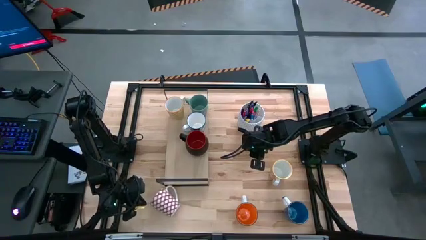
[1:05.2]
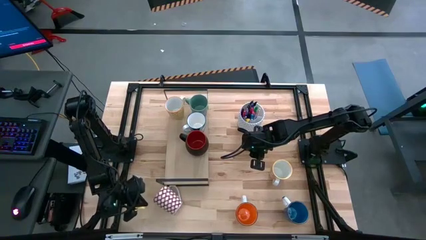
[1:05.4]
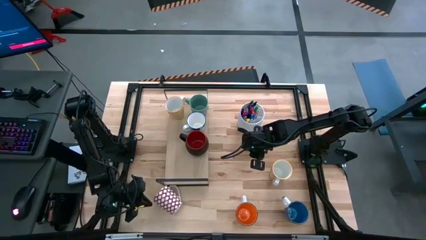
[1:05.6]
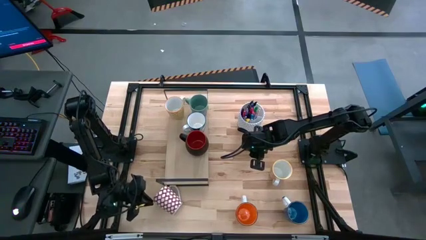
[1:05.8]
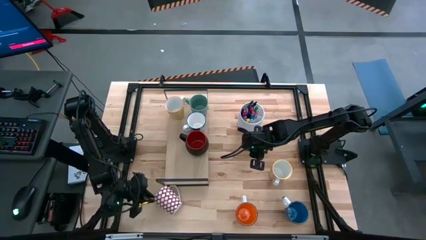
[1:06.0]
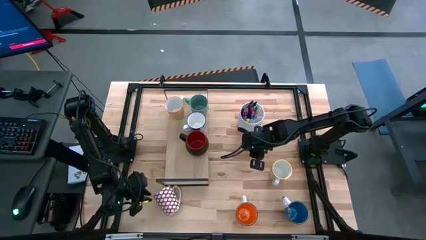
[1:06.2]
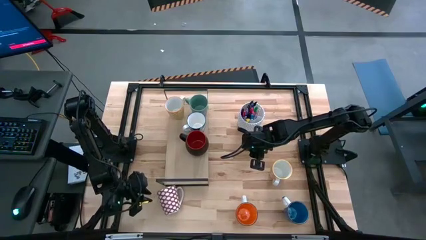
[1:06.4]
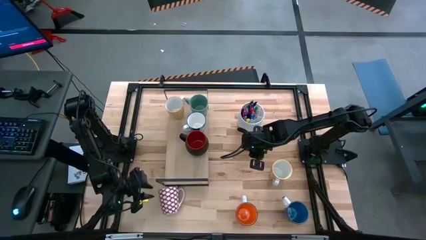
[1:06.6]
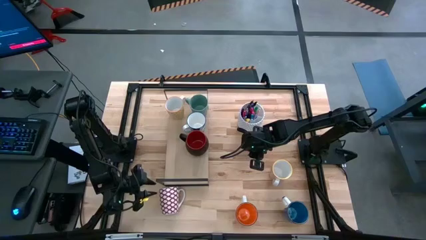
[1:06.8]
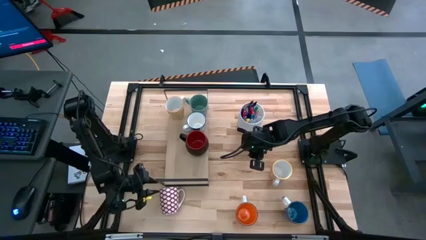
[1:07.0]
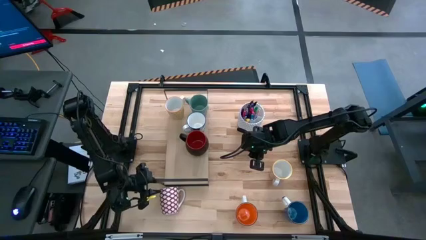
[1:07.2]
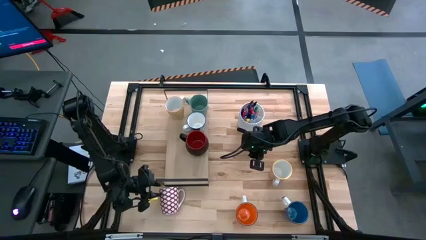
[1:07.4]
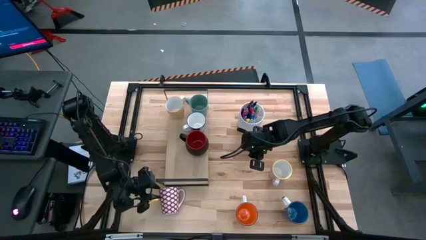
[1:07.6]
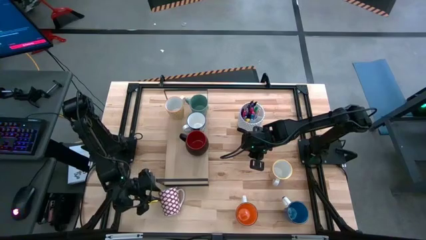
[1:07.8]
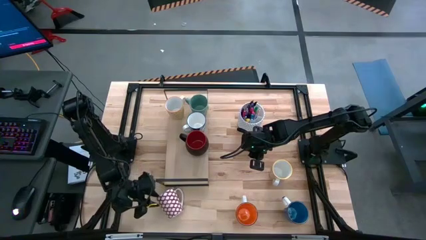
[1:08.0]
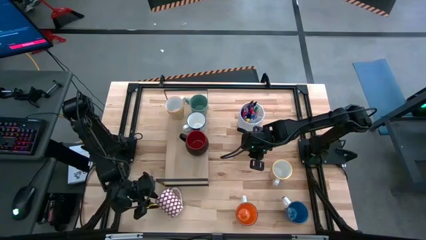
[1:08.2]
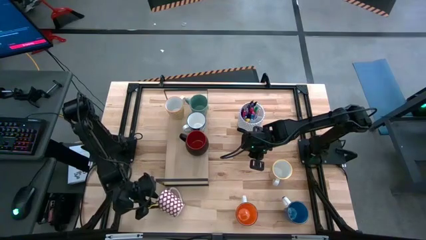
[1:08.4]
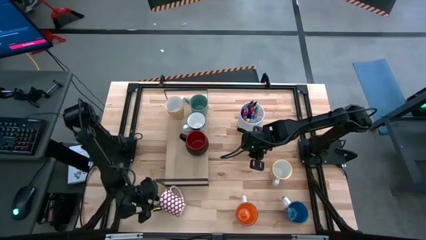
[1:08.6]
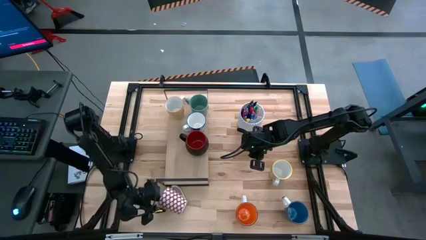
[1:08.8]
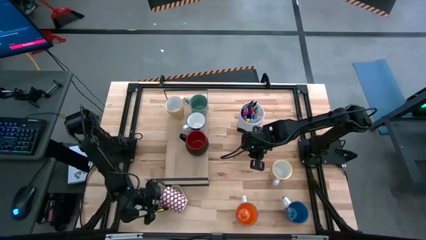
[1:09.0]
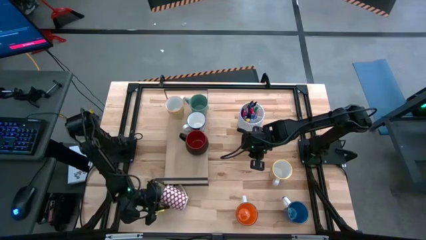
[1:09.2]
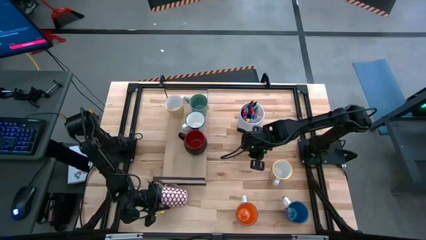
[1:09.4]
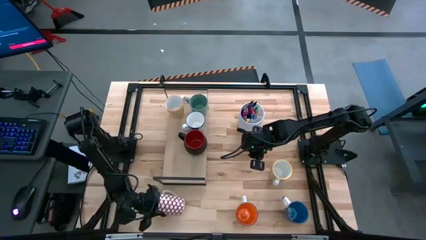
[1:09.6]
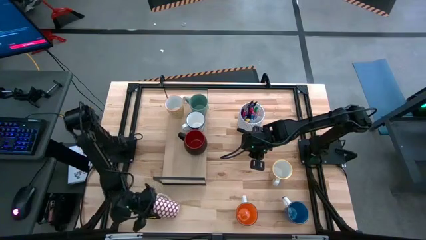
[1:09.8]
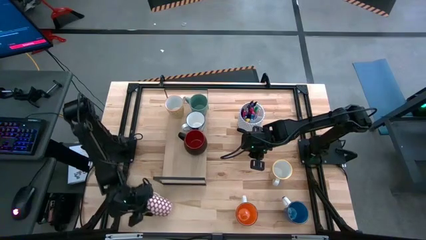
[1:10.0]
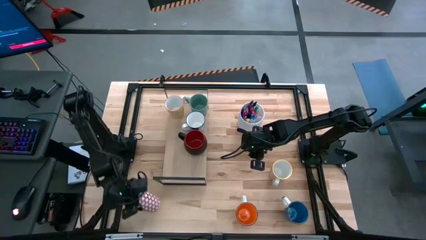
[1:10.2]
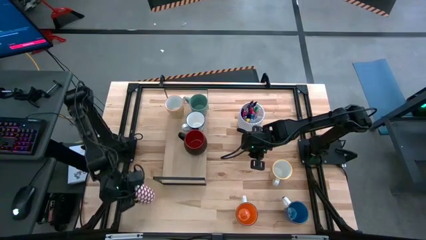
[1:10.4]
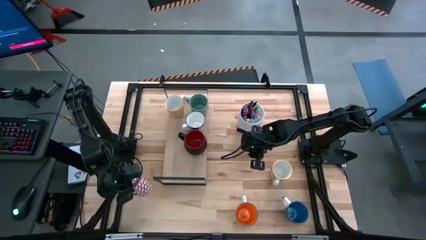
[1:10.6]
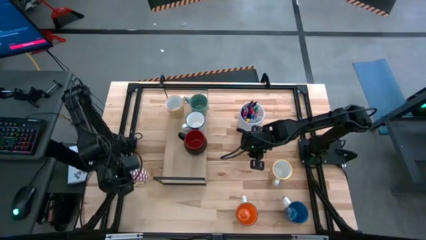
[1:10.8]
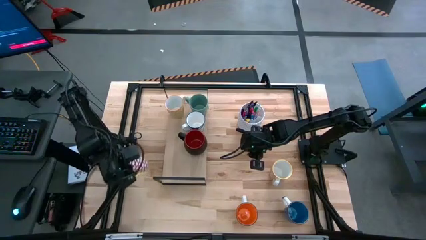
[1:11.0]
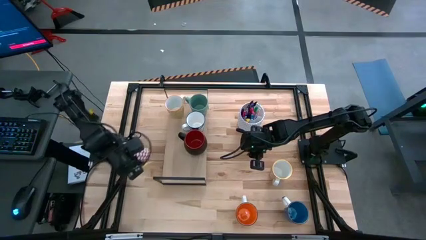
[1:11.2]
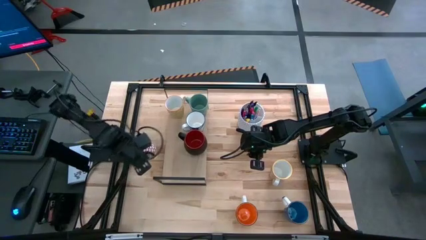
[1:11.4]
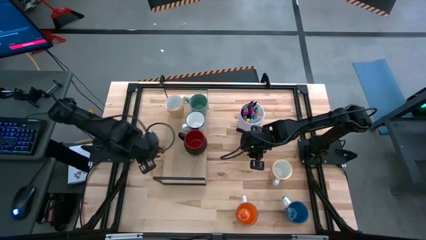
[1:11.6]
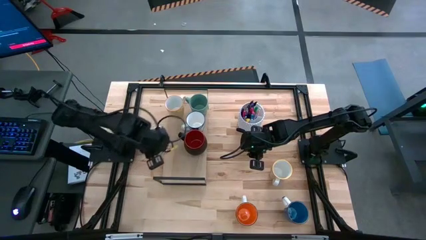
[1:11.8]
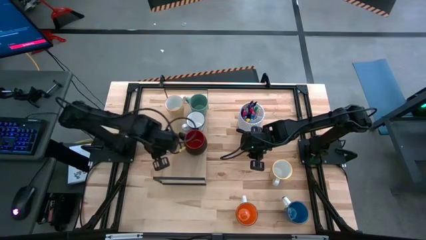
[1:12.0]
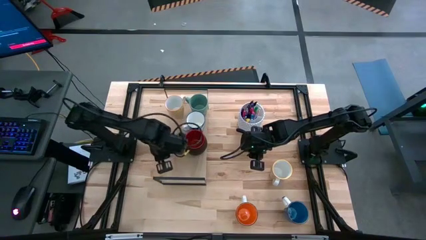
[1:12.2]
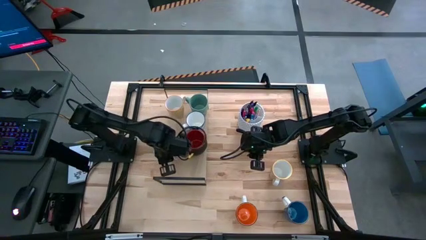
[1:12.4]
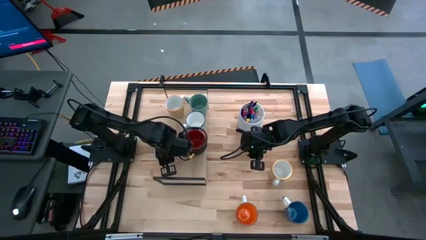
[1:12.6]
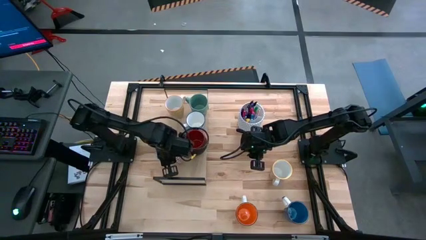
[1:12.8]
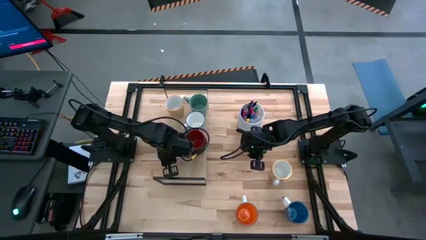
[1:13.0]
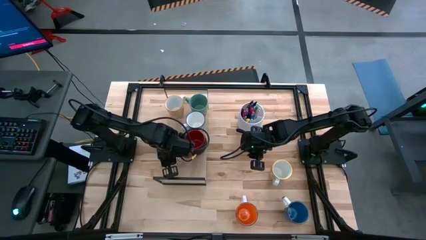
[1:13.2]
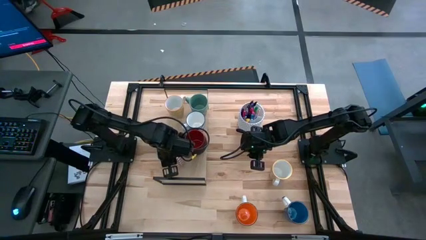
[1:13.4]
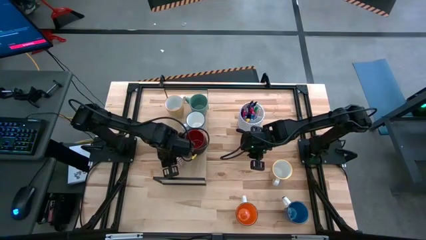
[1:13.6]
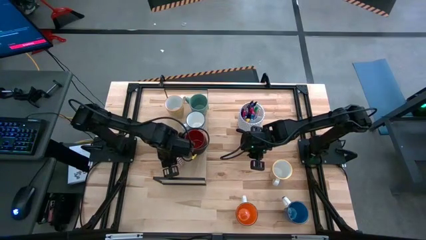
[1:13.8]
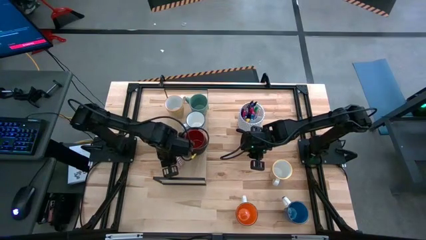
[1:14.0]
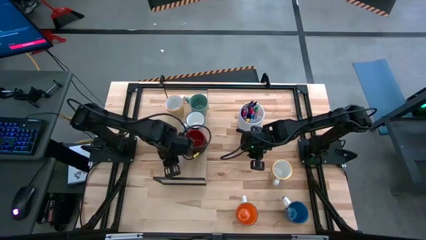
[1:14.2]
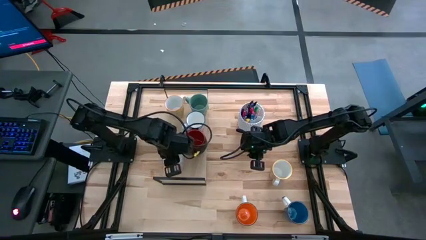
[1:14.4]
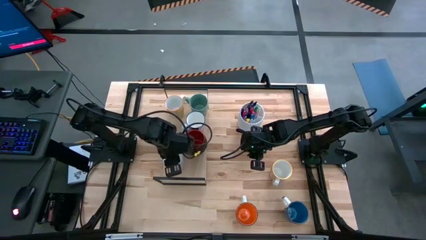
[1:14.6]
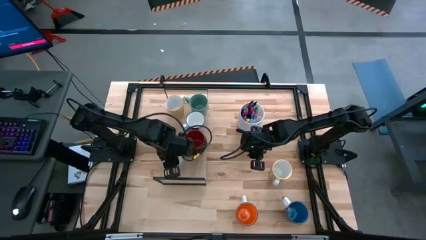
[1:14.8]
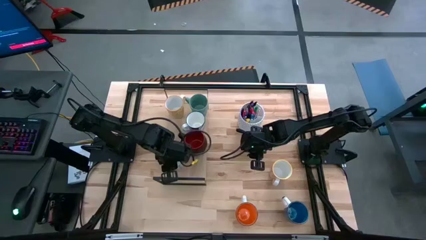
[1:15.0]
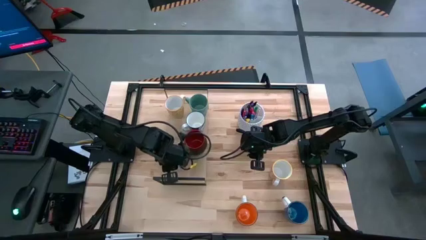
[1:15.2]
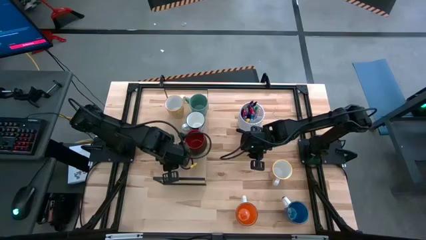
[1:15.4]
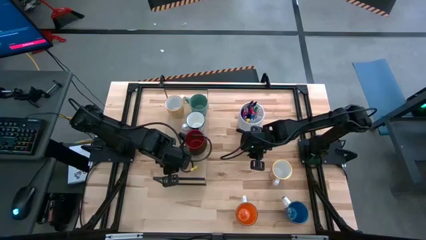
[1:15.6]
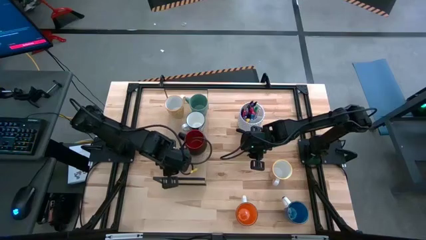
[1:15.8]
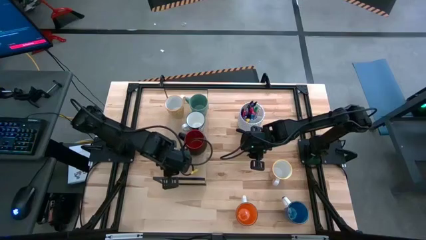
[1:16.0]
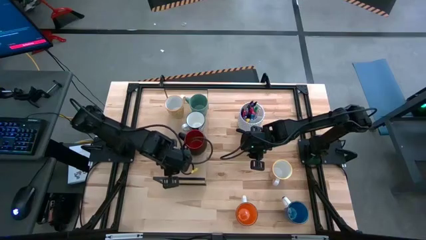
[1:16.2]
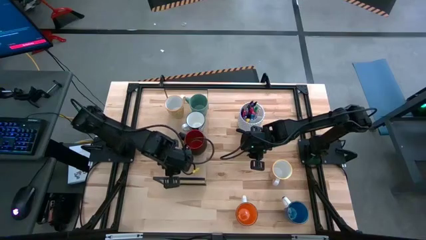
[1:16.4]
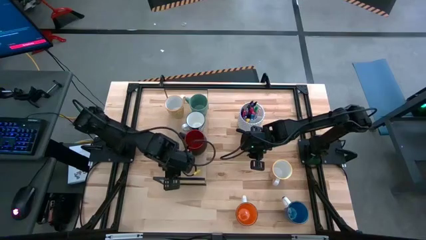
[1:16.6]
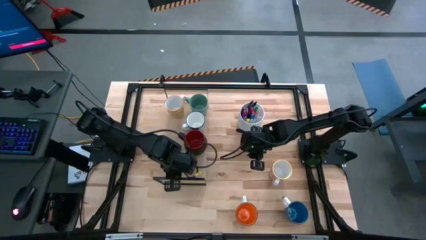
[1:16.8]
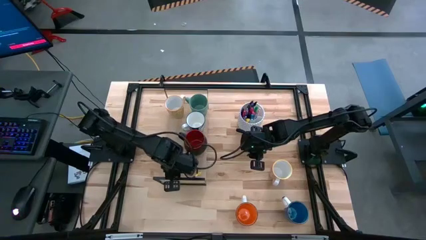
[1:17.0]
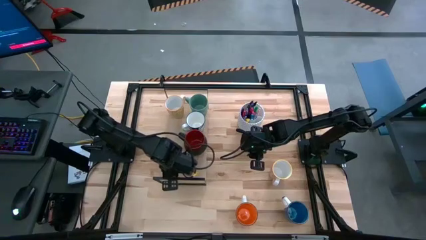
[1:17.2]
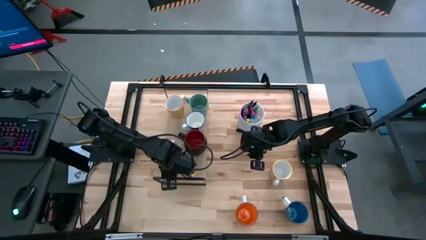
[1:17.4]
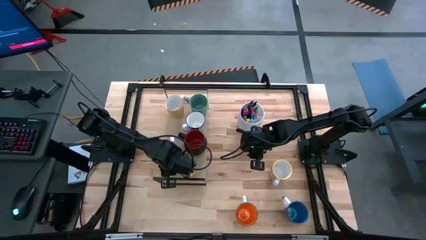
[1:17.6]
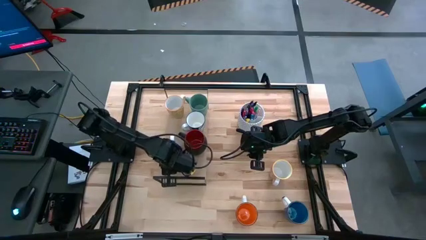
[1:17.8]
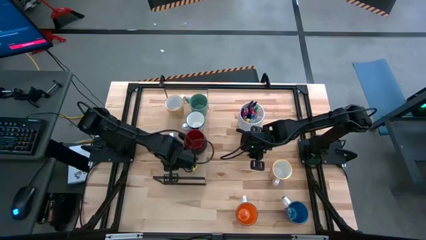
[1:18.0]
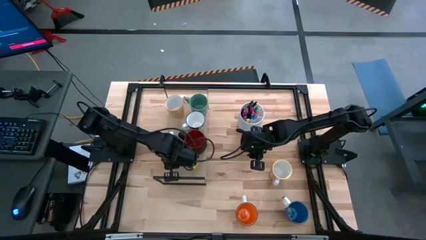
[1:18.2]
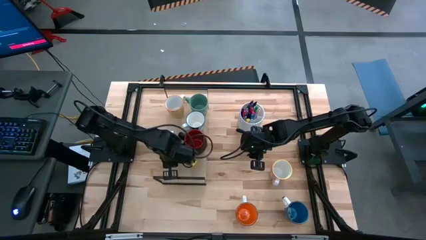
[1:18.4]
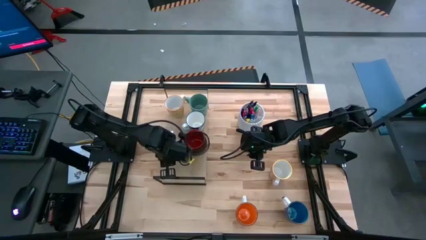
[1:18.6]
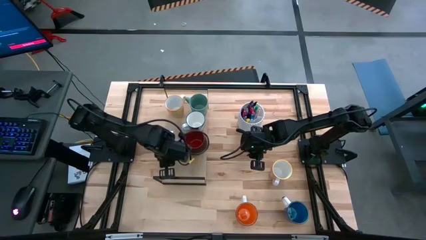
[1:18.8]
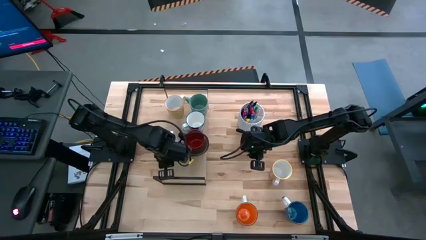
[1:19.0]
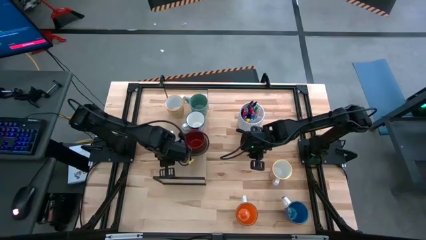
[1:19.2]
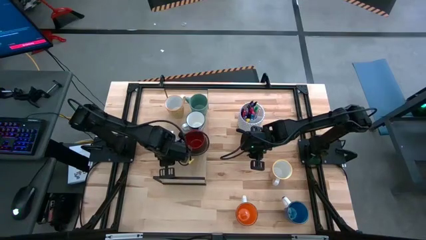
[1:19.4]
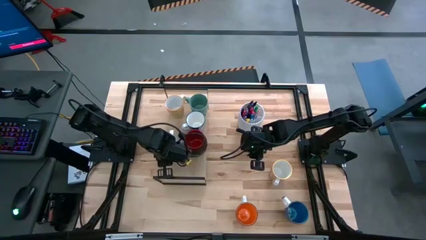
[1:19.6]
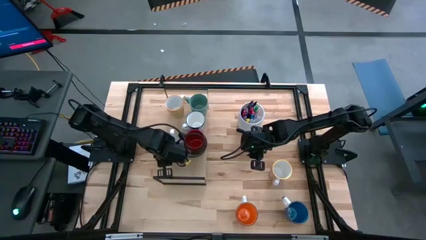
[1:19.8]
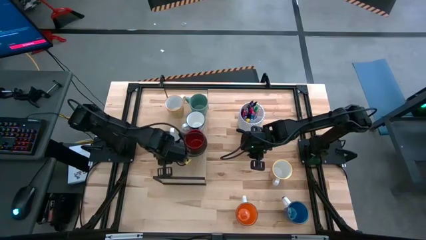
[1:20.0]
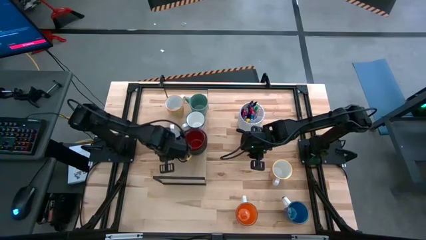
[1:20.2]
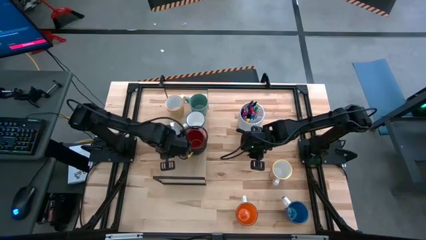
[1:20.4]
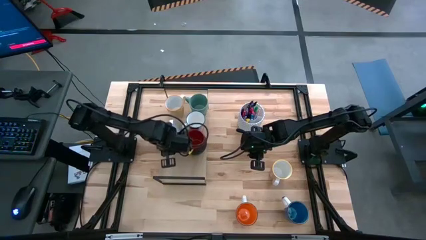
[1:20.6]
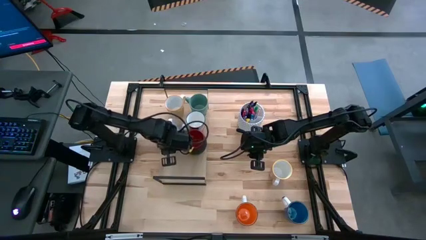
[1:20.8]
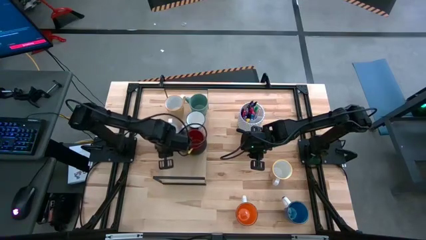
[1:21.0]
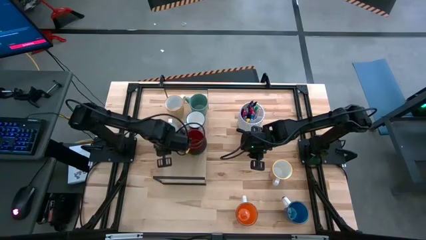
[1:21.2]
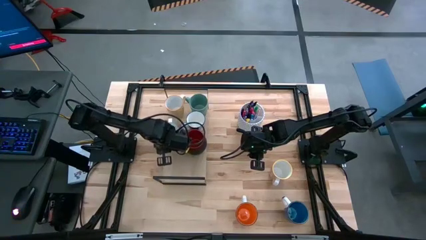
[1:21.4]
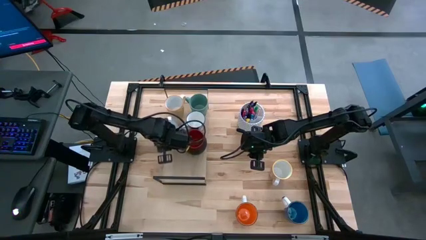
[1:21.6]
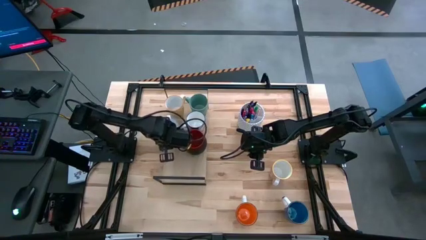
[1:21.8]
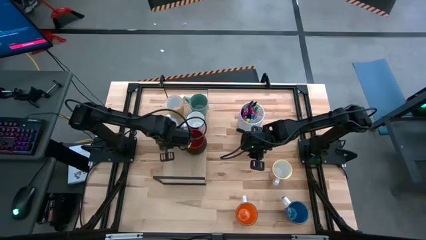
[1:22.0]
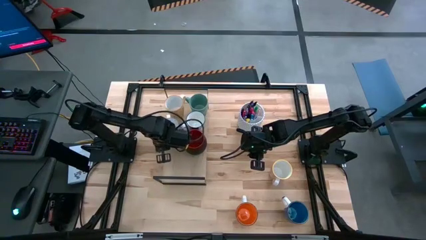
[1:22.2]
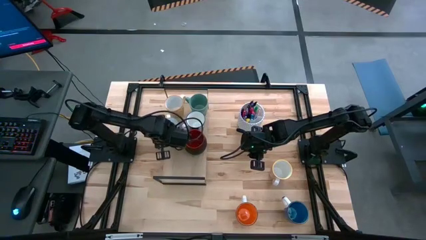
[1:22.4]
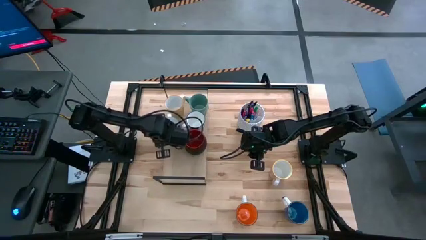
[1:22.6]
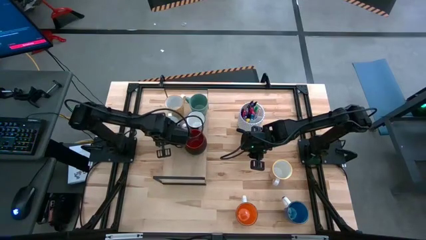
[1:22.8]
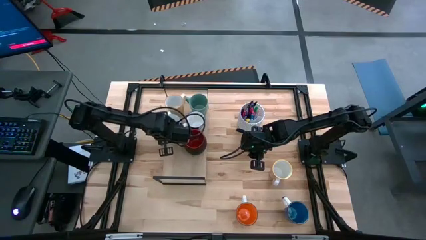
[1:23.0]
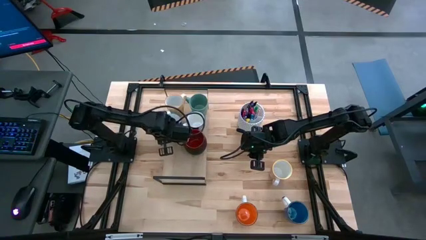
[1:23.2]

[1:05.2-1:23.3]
Task: Place coffee mugs
Put the red mug on the shelf
